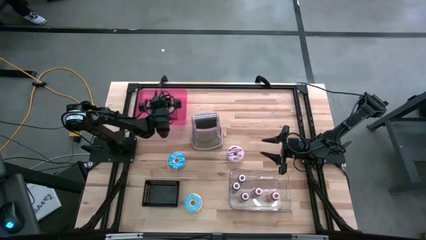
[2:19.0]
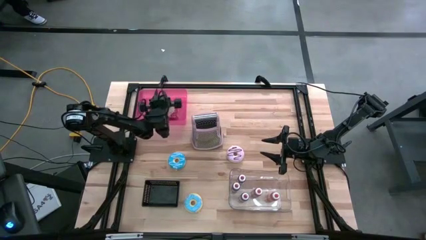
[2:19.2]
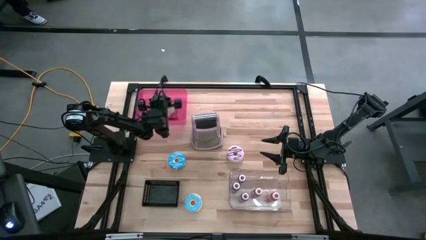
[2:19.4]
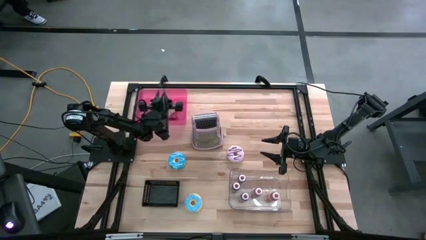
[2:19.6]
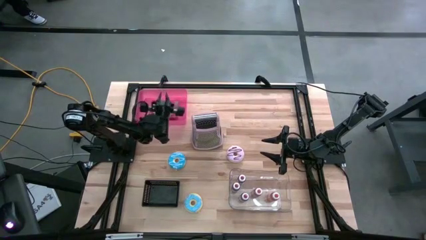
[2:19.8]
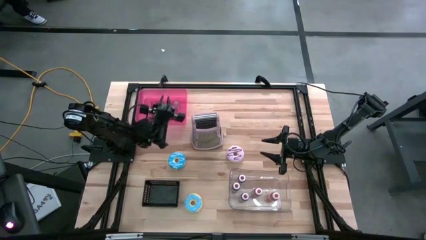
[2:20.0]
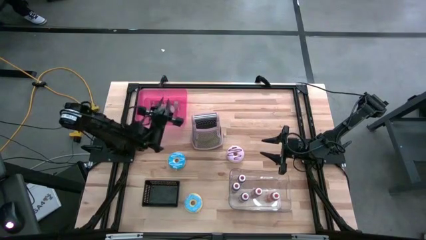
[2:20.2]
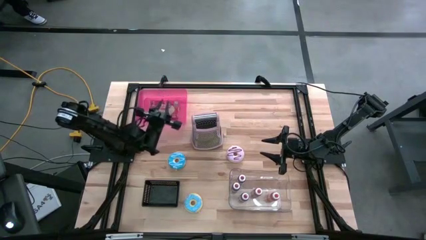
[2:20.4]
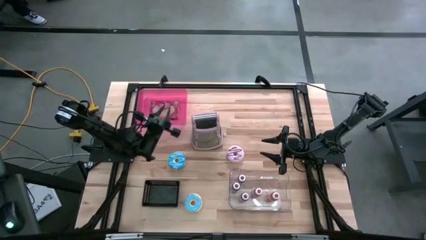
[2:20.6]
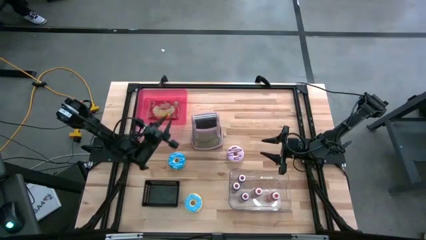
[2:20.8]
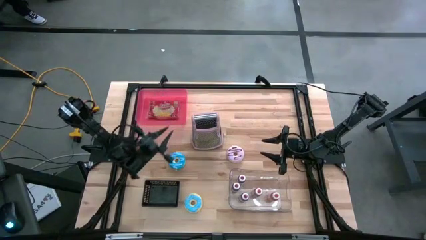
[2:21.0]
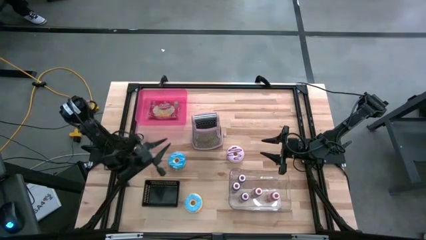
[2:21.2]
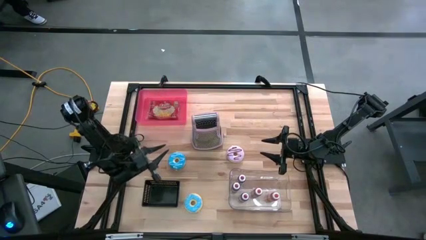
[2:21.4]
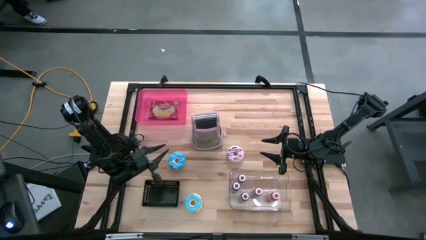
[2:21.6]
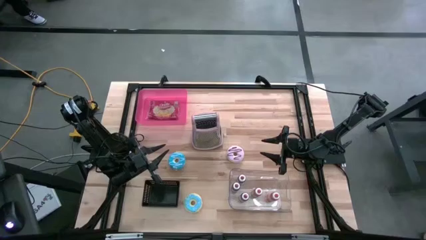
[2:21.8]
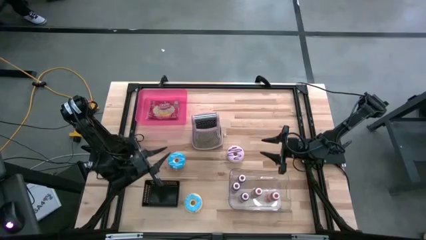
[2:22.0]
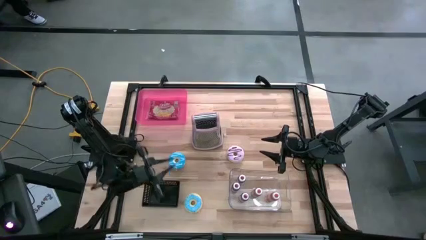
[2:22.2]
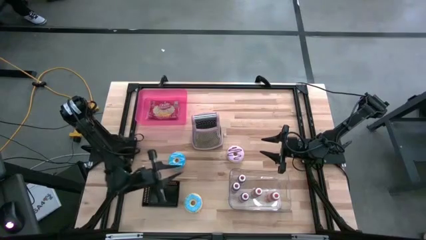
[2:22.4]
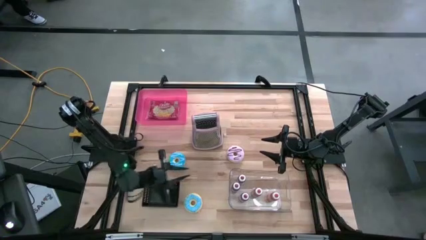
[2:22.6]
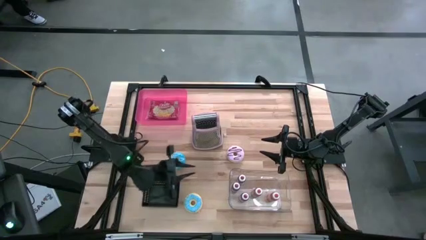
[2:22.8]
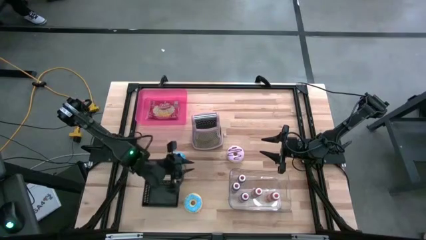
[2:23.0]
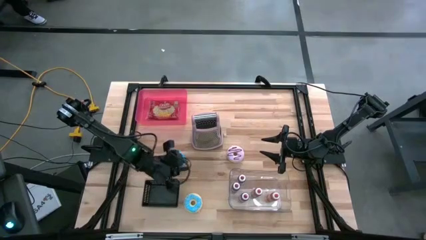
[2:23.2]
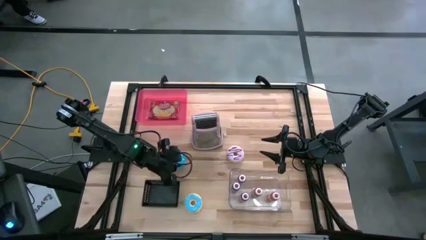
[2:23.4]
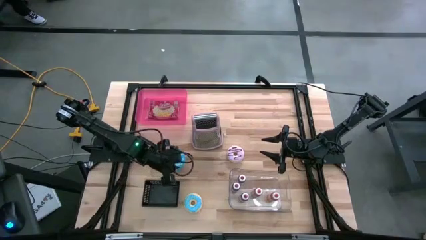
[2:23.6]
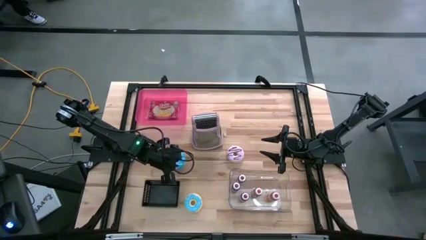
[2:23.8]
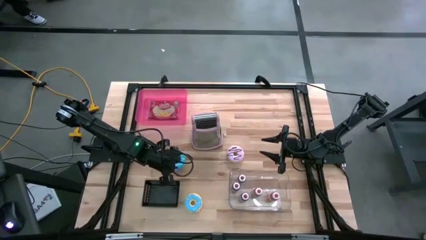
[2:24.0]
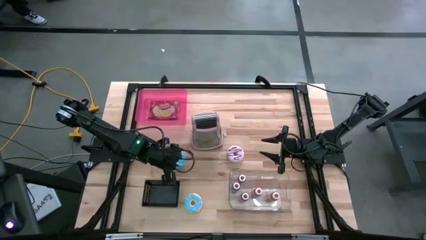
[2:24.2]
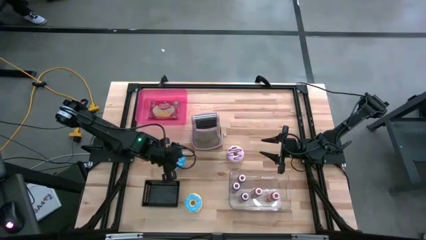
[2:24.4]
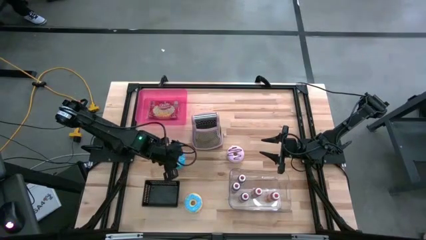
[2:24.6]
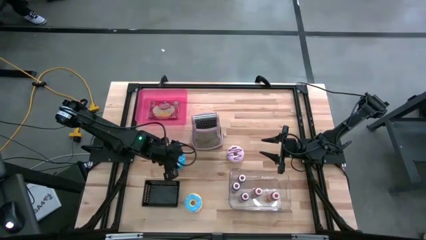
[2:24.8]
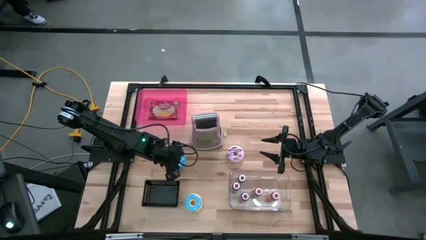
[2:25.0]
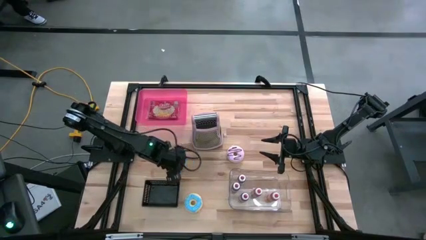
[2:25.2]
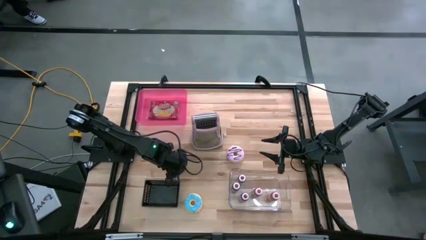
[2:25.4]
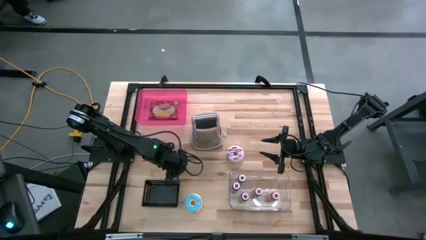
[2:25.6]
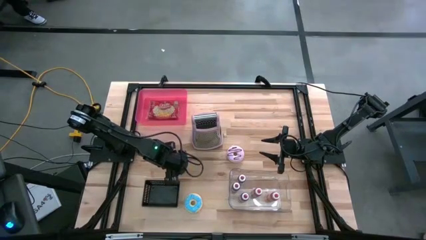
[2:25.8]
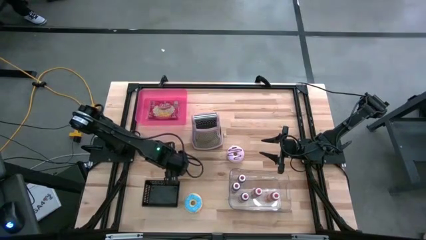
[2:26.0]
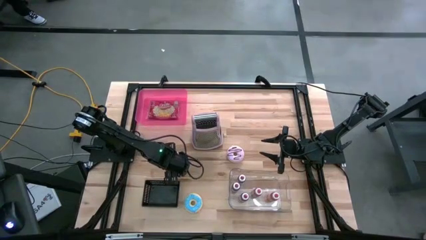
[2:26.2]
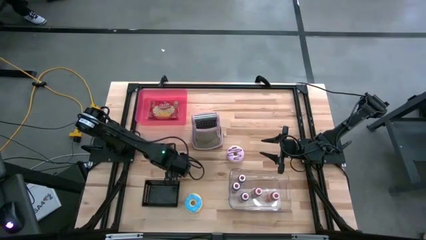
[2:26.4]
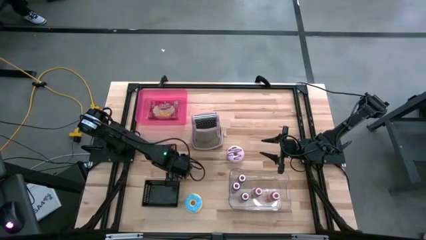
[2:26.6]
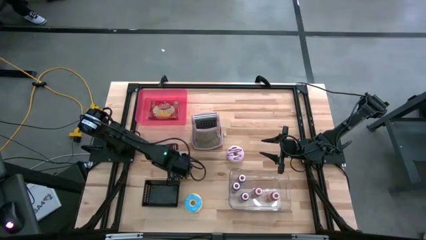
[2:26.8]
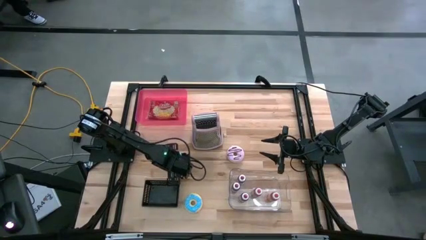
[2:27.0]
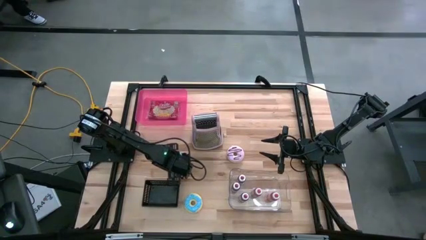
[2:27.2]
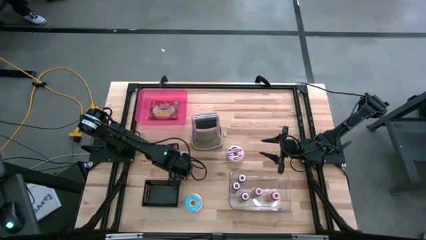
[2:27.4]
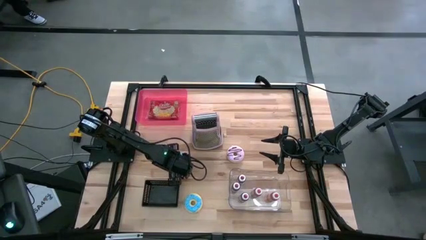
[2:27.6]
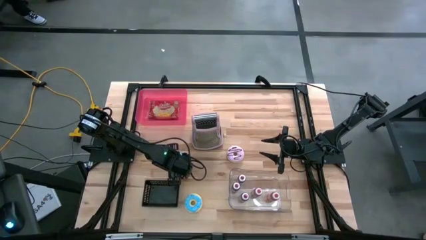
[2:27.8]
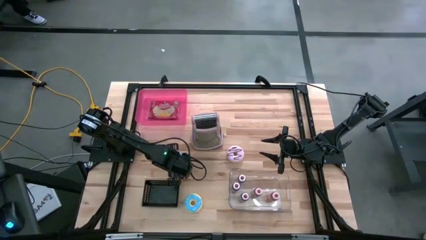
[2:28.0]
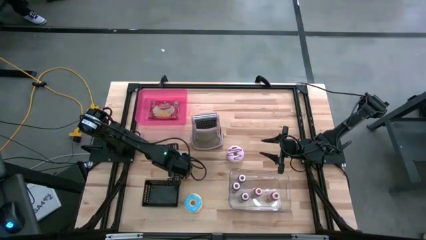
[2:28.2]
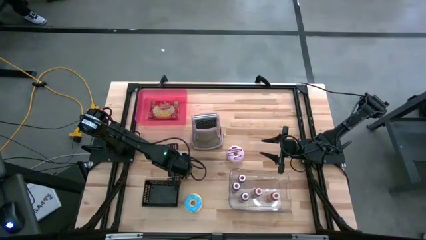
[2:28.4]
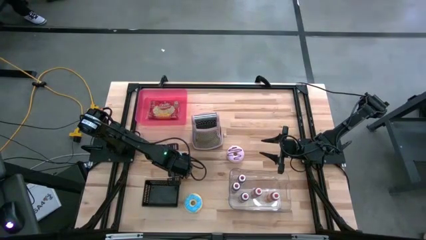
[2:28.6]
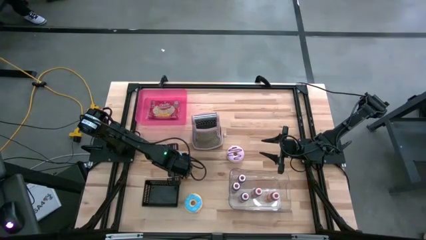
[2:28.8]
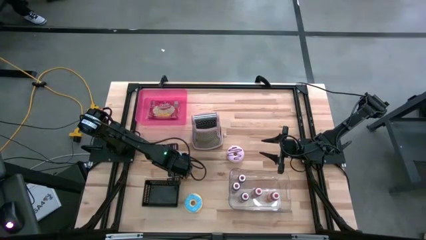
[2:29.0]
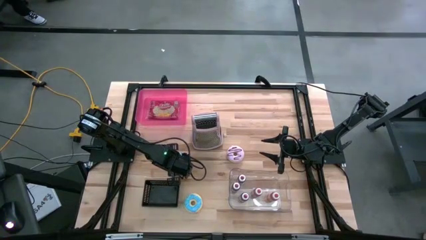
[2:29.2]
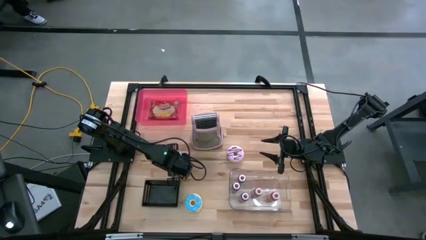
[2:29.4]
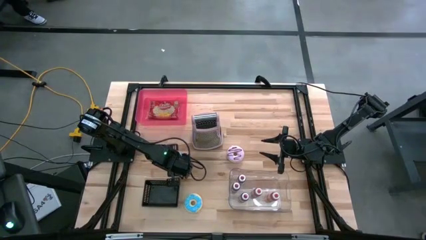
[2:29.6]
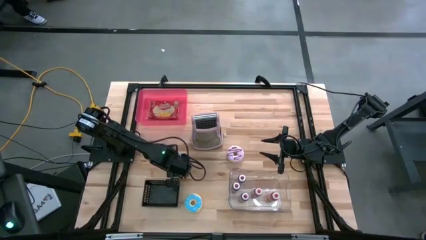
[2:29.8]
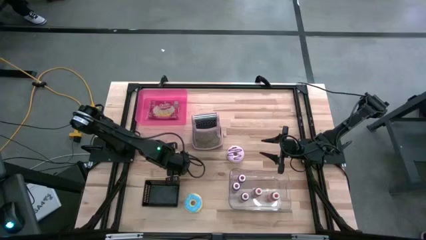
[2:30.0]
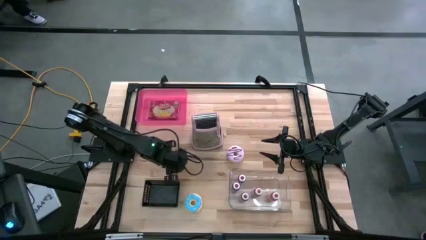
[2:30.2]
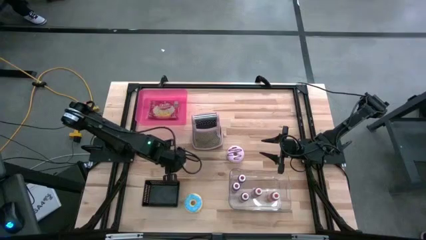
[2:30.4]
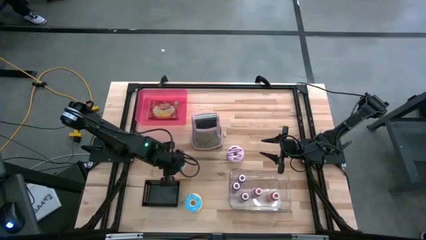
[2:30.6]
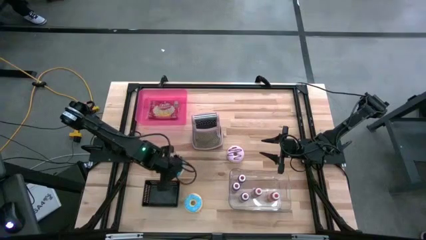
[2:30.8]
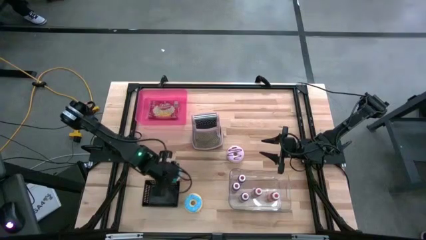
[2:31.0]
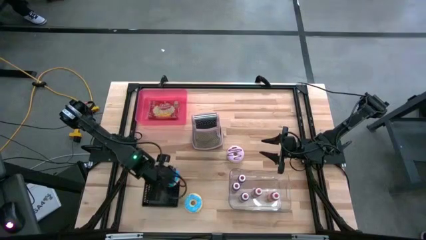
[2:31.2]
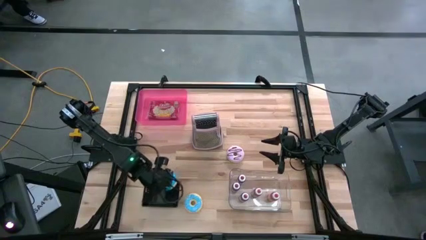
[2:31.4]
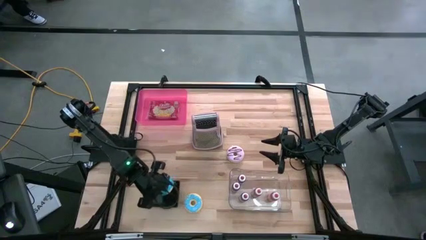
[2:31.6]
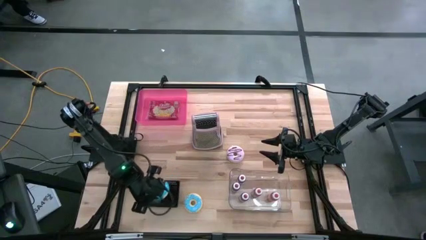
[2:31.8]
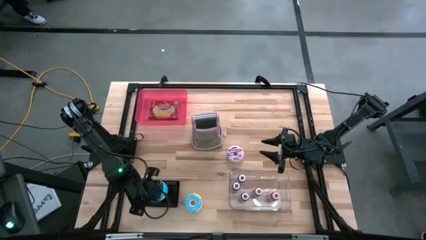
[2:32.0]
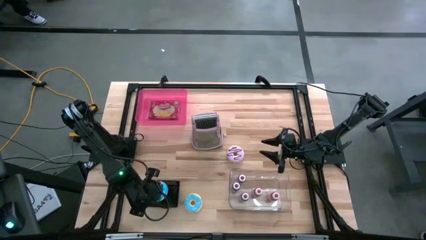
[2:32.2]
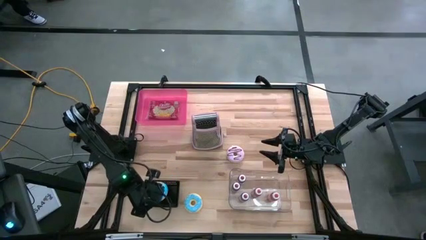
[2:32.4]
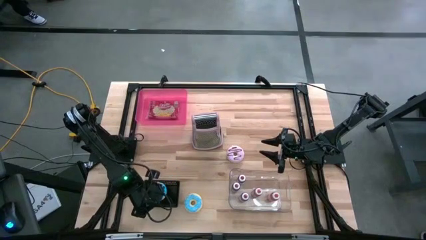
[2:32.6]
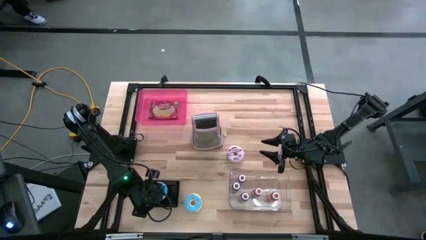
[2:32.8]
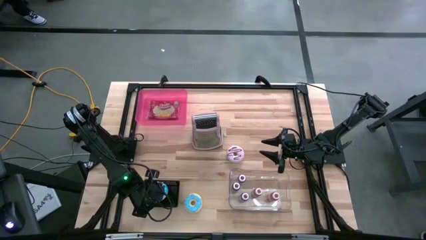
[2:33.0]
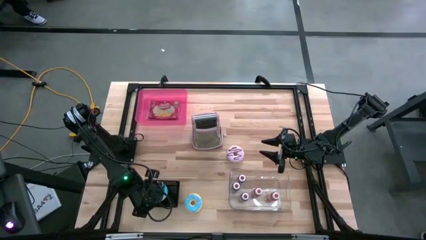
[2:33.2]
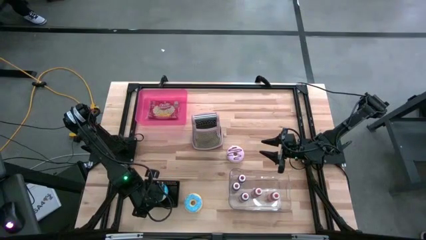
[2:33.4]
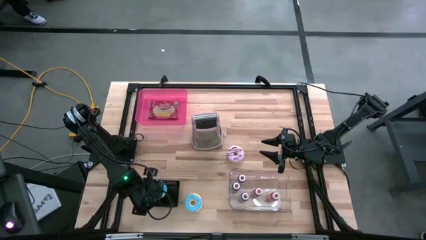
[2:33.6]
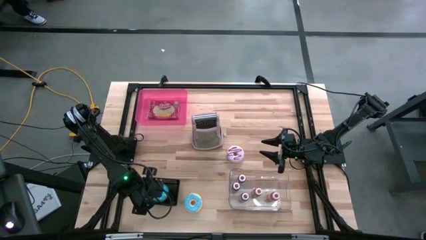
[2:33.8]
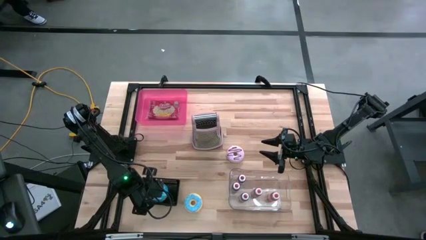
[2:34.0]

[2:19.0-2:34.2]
Task: Pick & Place Food Item
Put the top blue donut into the black bin

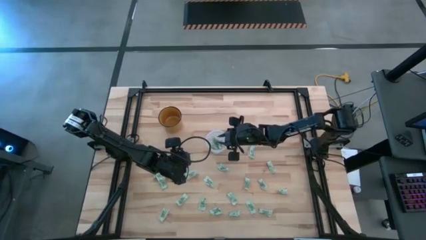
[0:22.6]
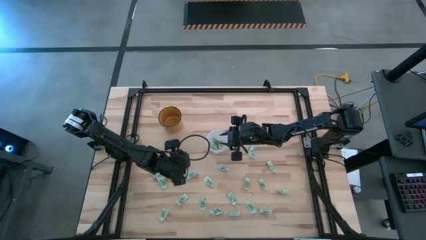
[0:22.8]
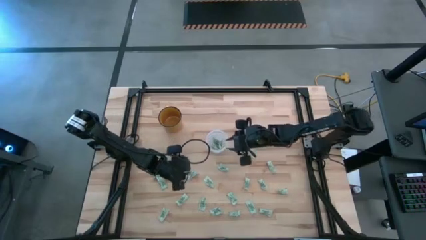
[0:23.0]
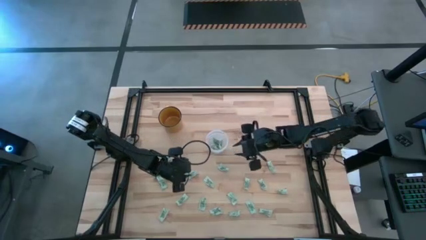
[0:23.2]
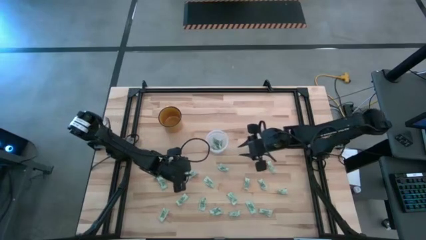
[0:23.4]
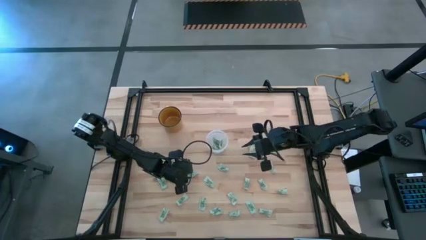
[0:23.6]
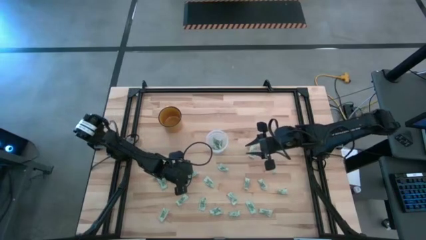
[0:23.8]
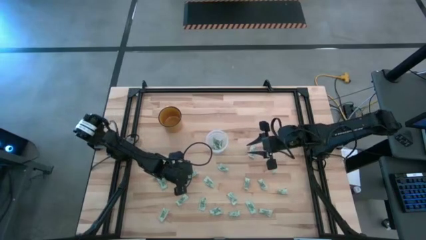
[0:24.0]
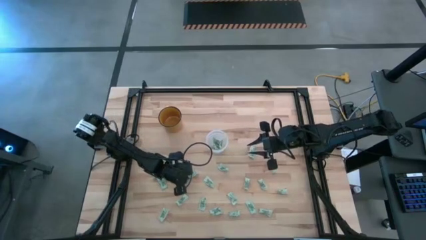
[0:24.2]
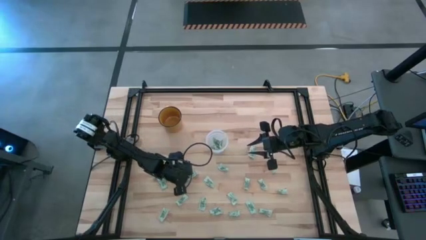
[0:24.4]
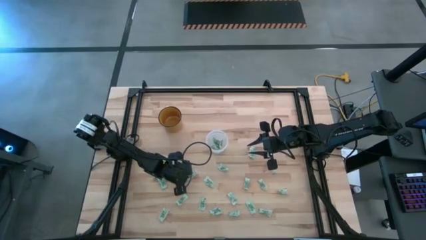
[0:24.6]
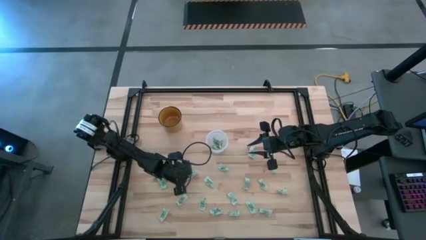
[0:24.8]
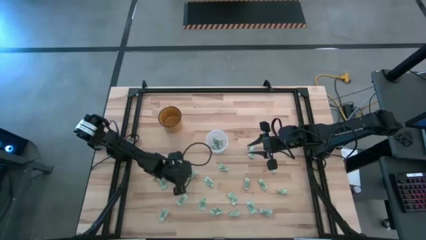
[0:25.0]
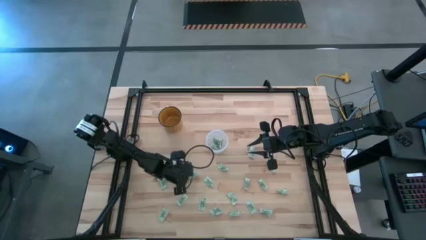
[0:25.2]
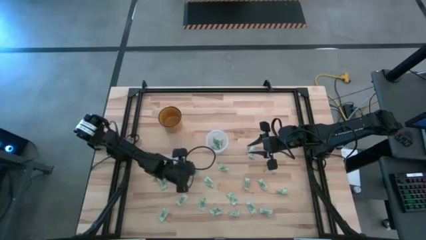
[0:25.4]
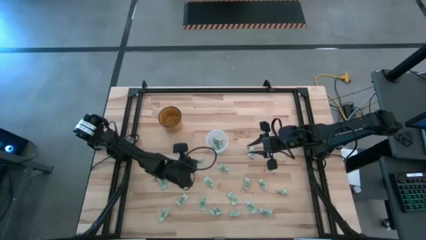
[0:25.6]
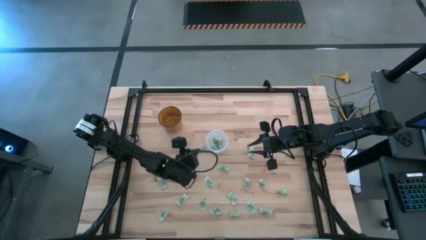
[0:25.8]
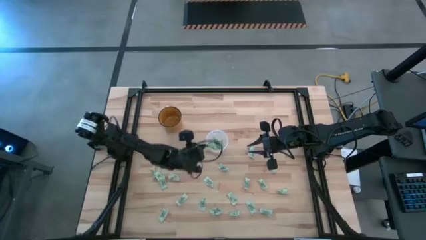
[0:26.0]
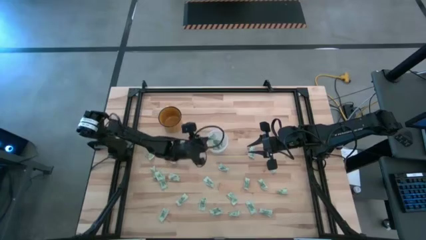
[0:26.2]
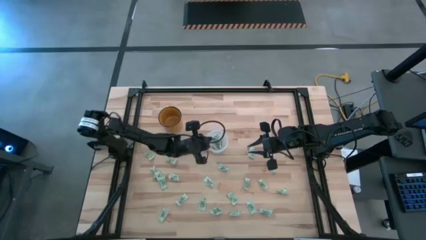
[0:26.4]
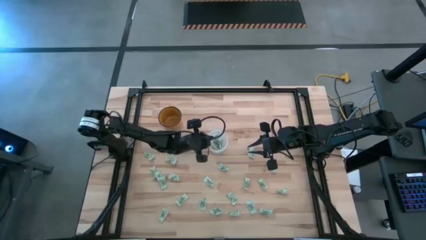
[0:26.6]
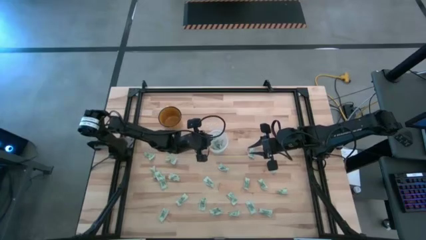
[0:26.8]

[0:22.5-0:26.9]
Task: Pick and place Stevia / Truvia into bins
Put the stevia packet into the transparent container
